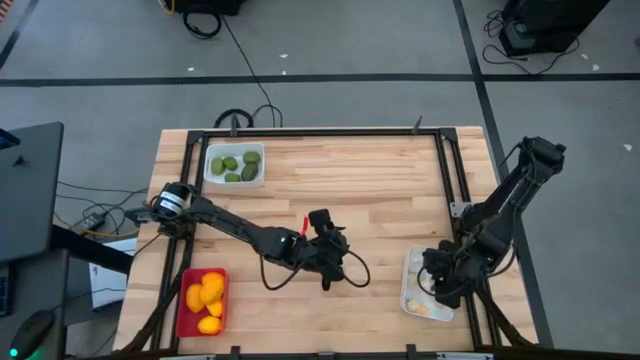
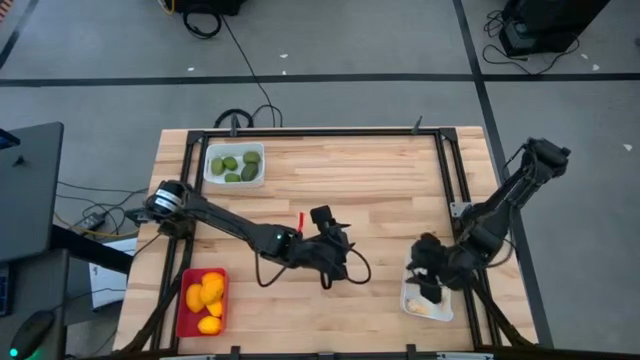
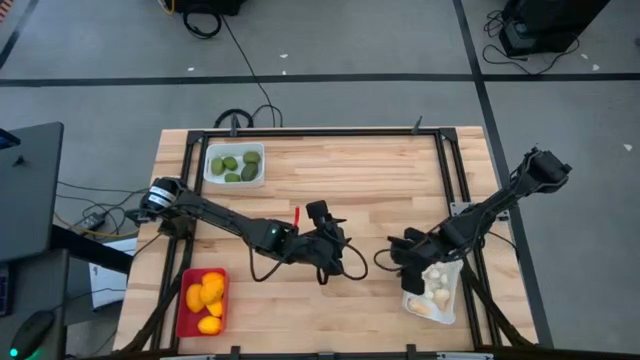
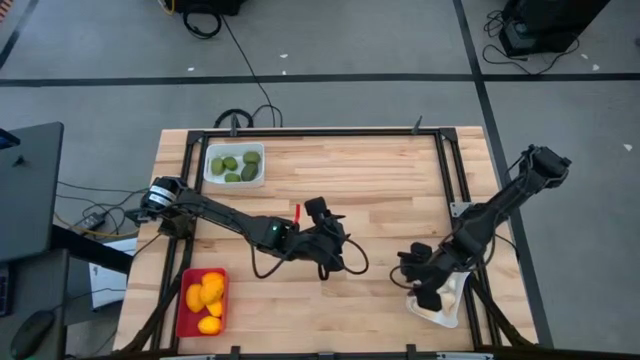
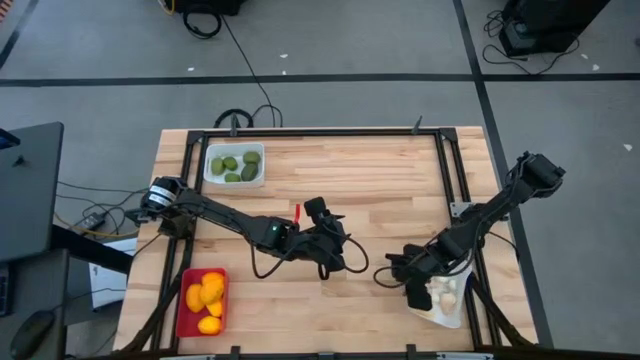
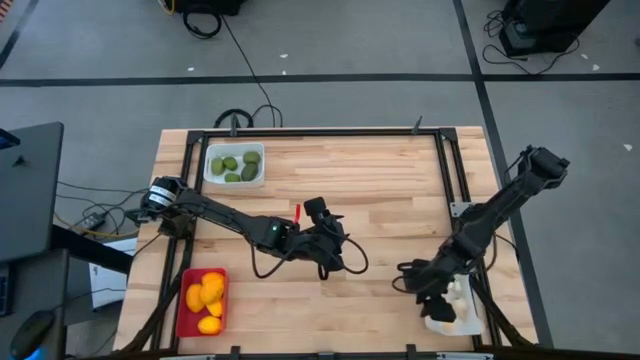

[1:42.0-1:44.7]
Task: Sort produce into baskets
Adjust the white bin

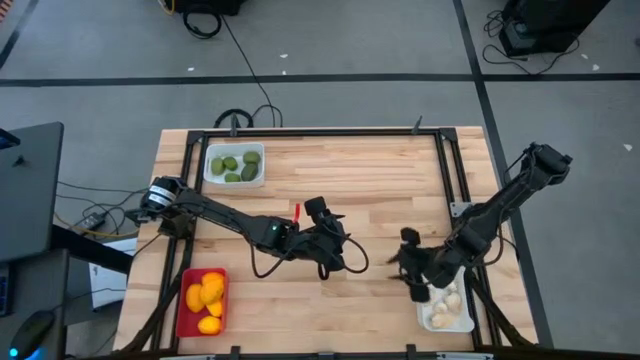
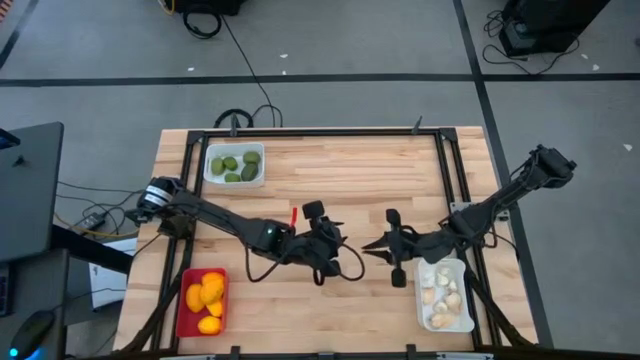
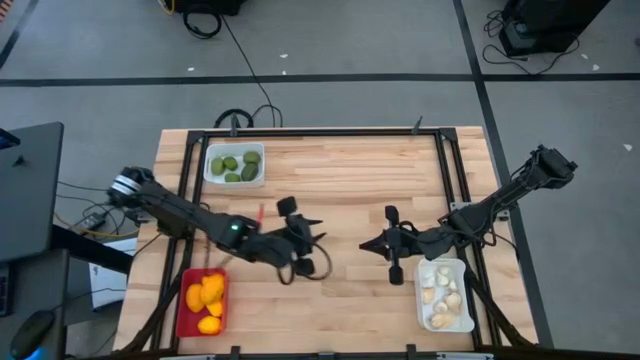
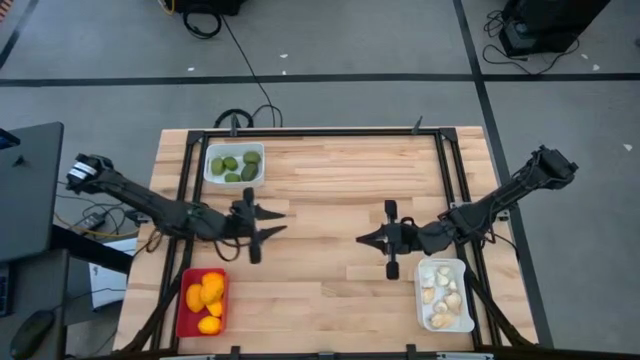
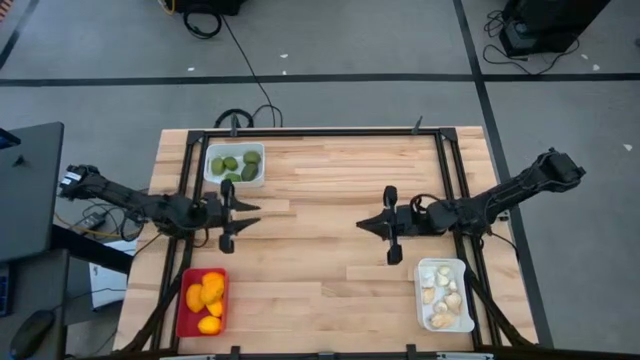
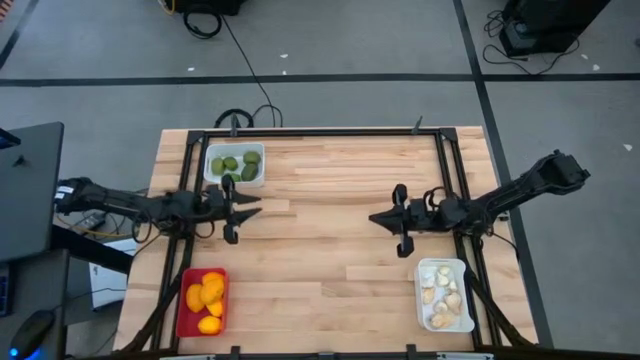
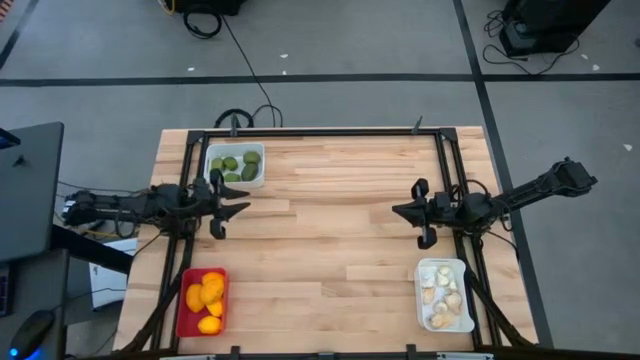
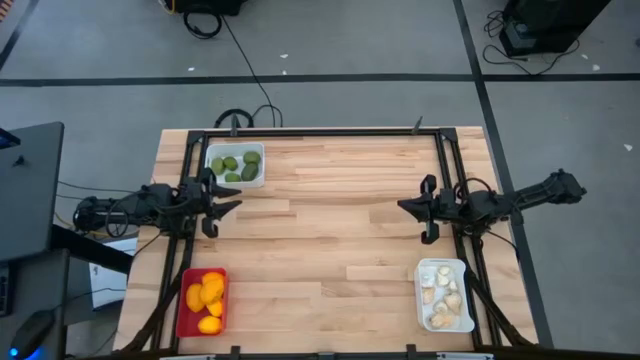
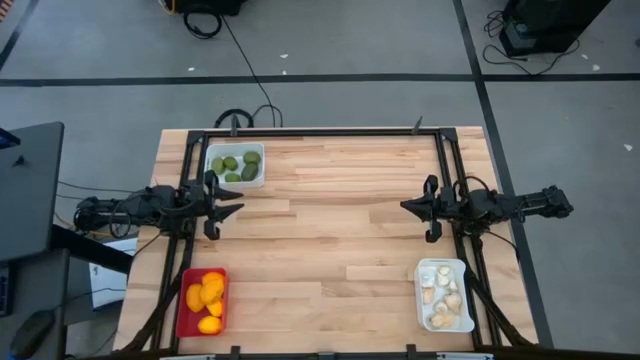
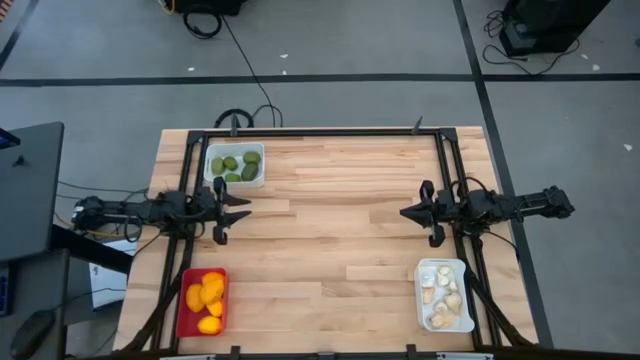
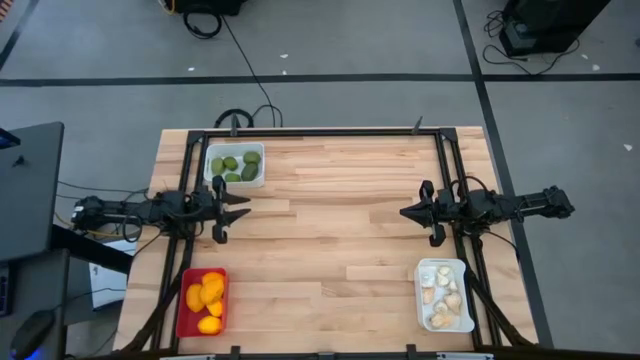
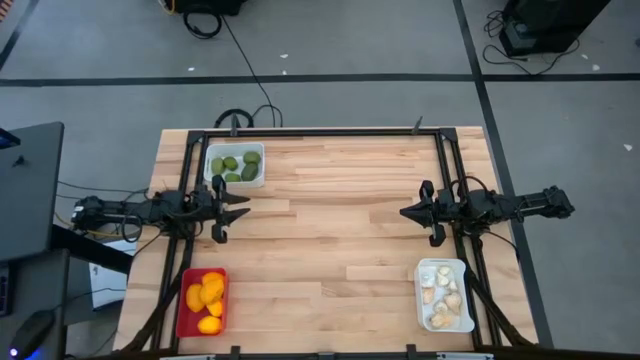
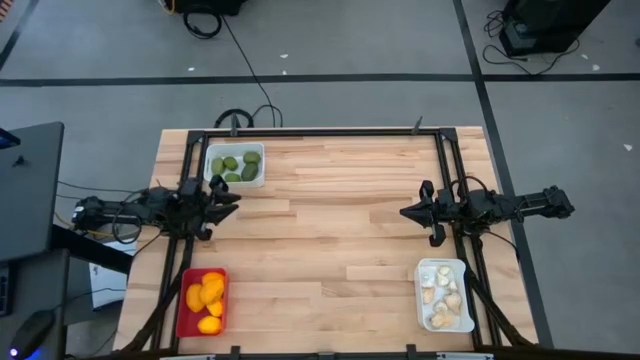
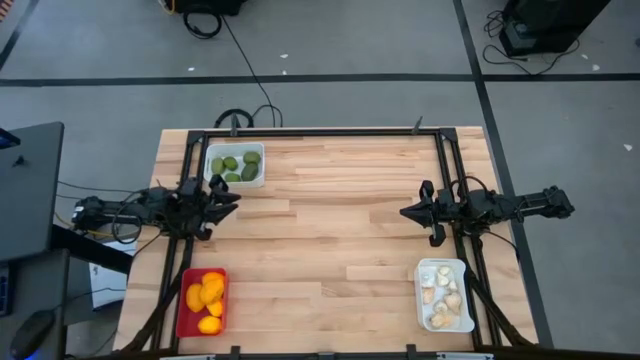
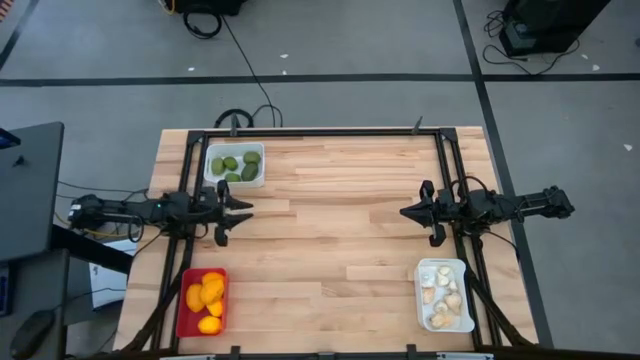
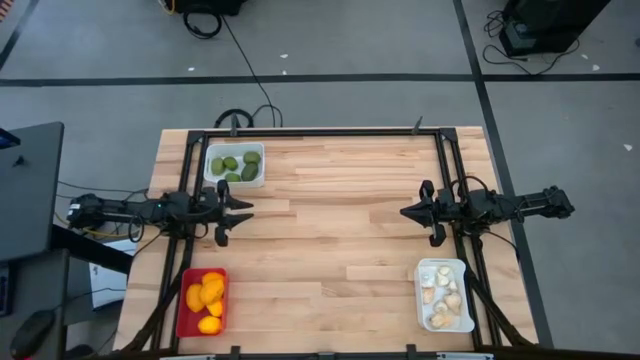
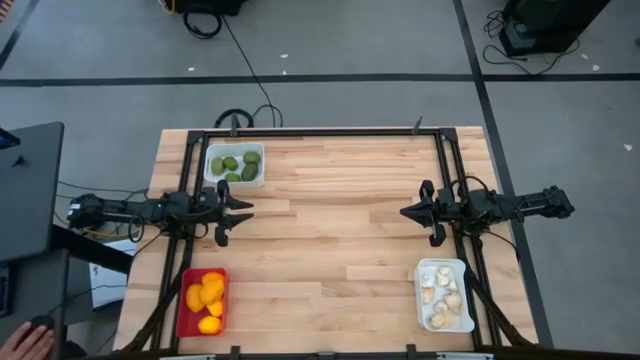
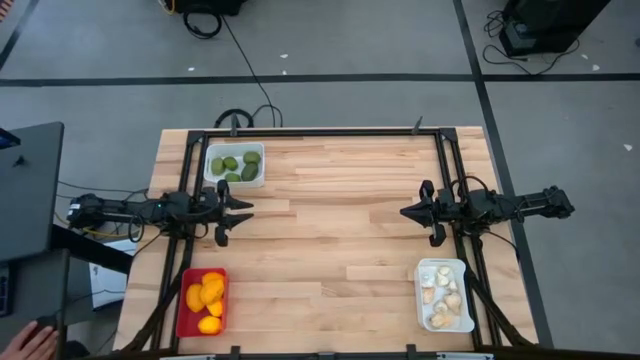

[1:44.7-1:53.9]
Return to Home Position

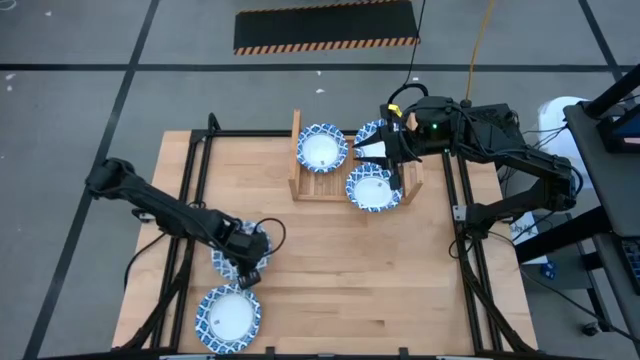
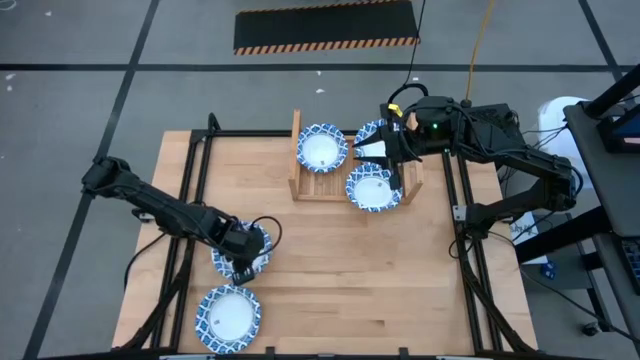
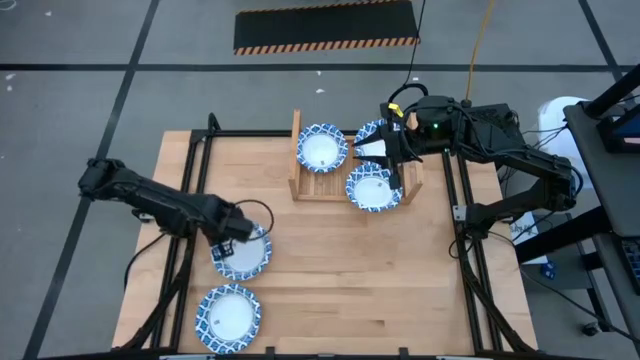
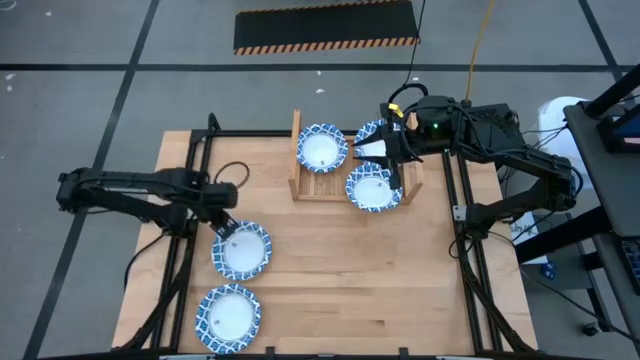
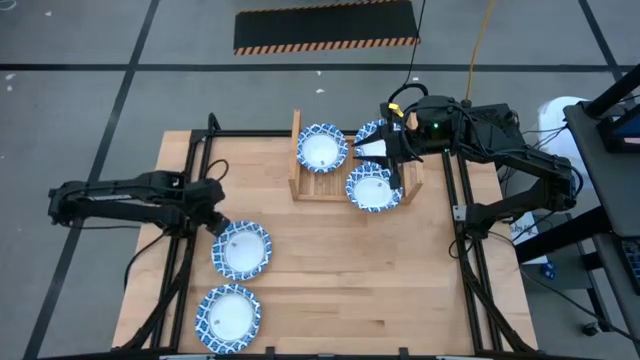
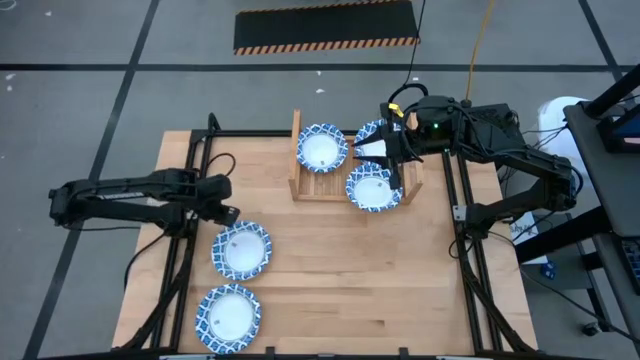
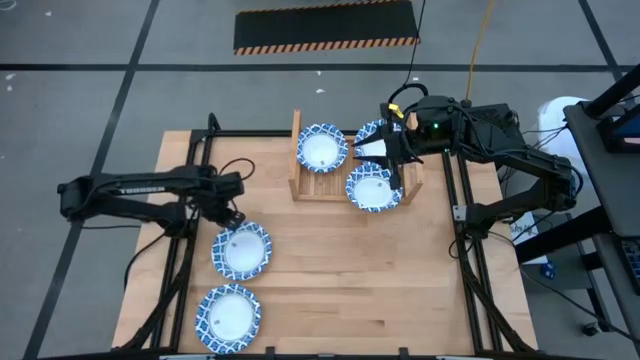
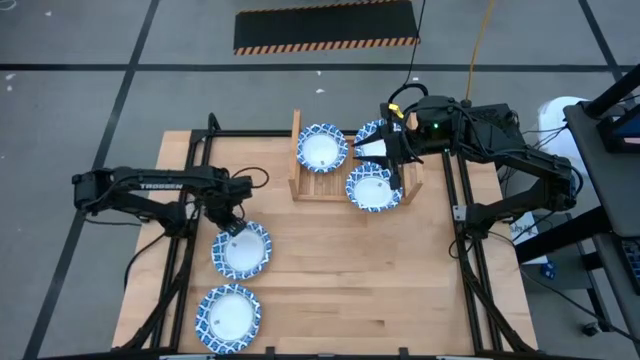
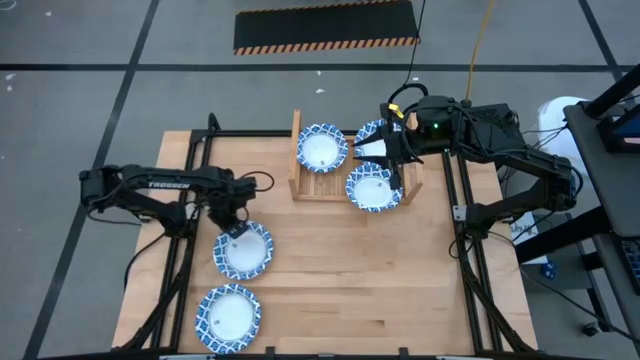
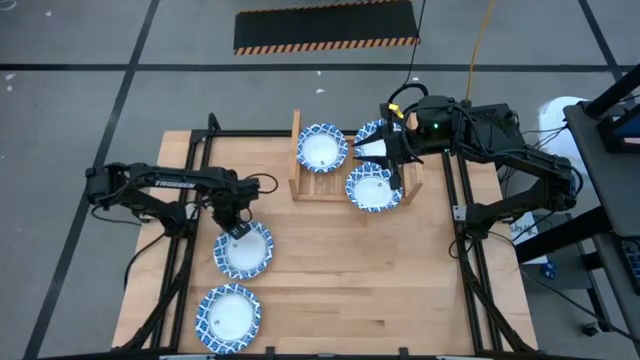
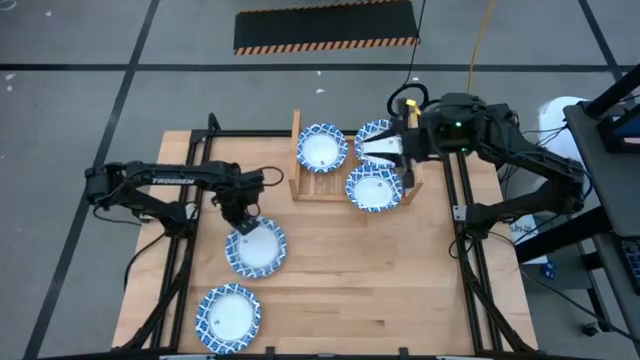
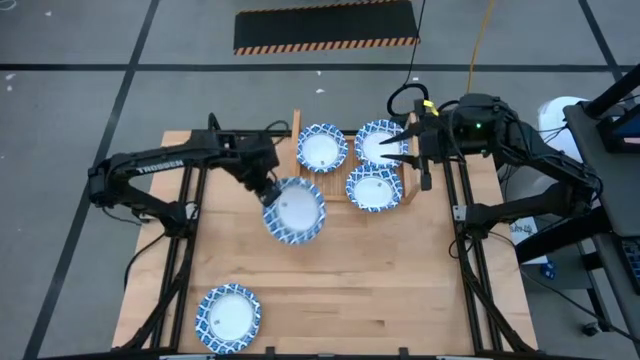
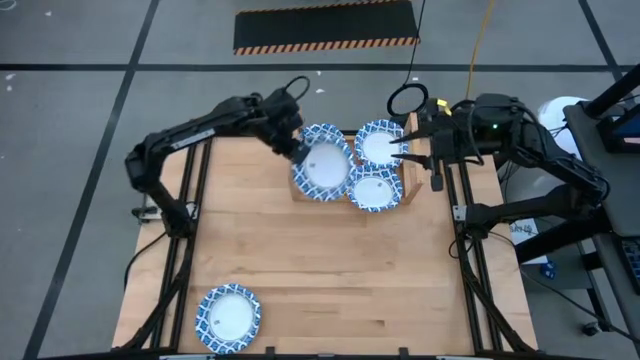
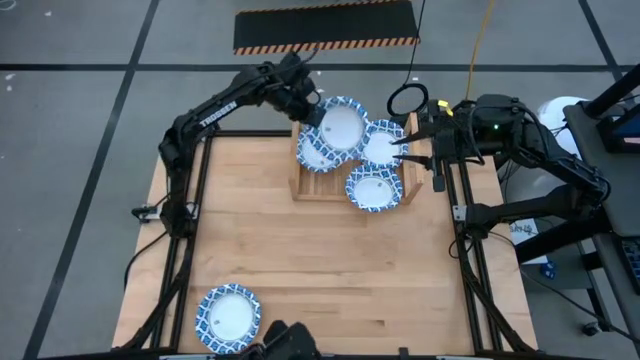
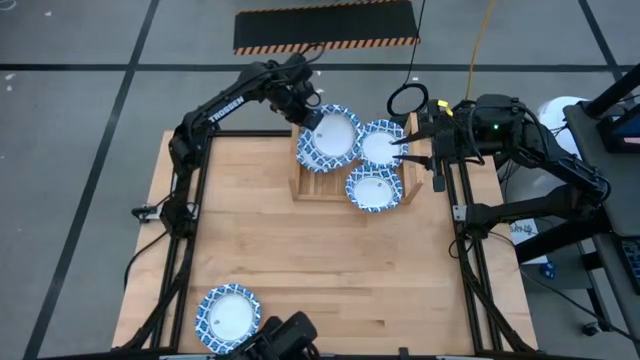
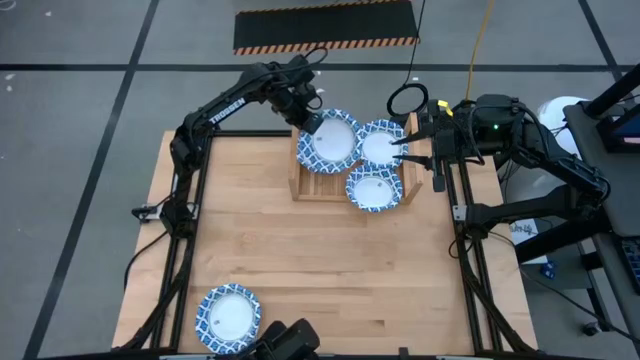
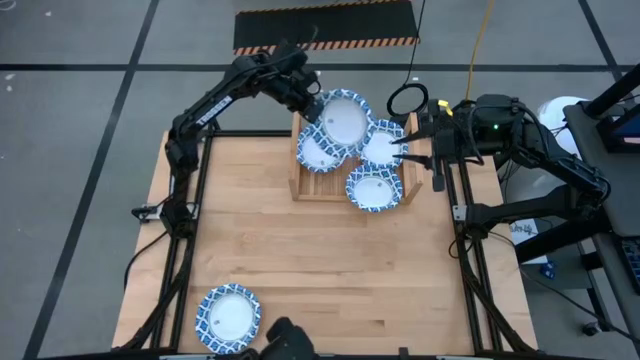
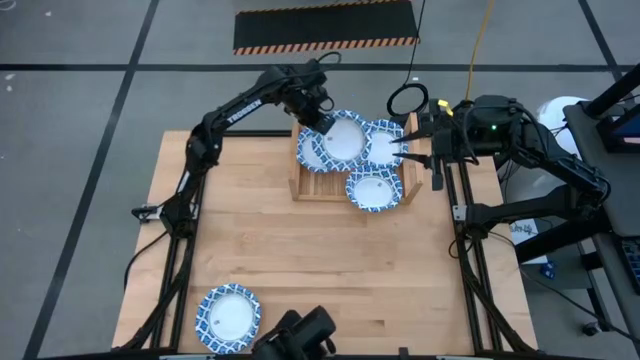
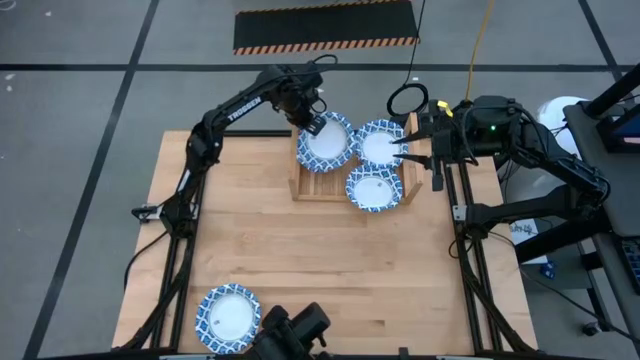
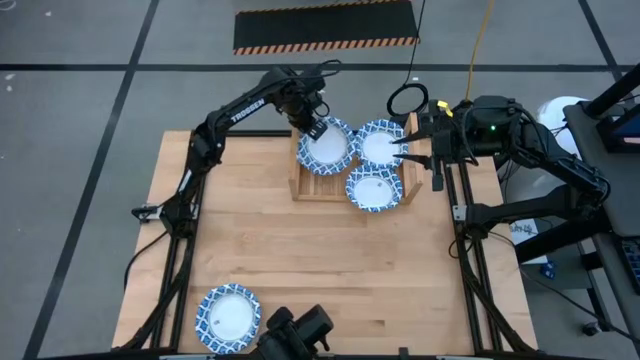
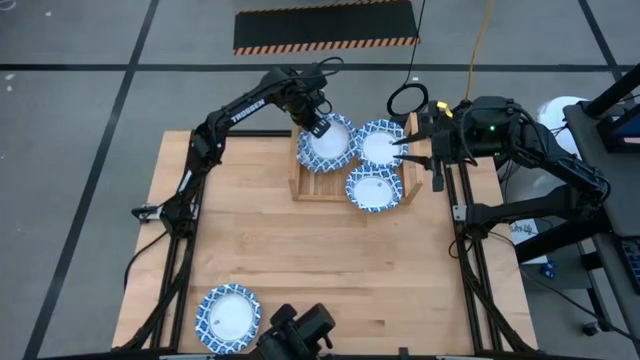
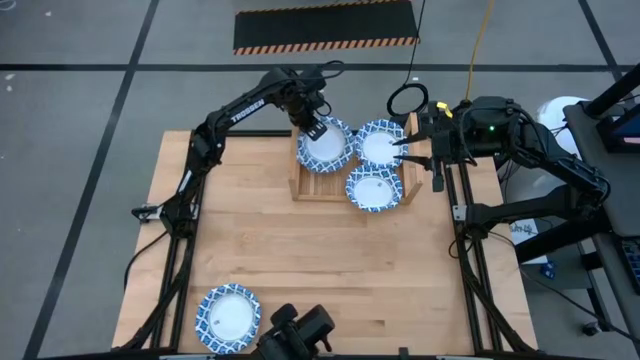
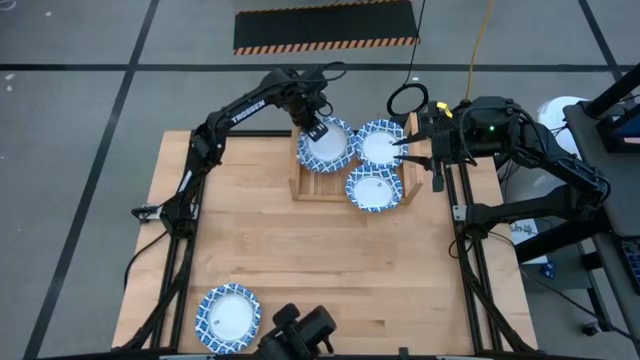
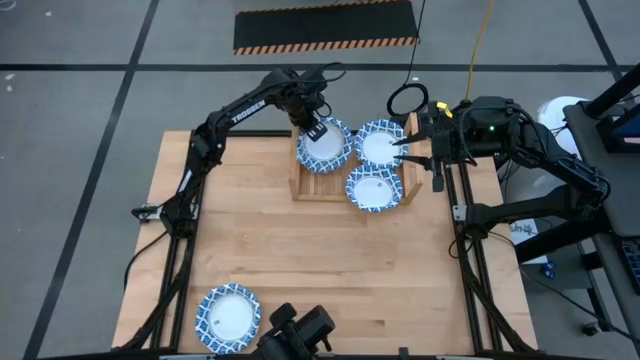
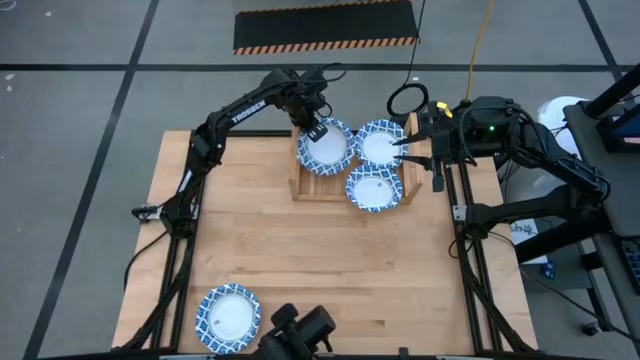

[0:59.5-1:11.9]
Task: Place and stack bowls onto a shelf
Stack the right blue patterned bowl on top of the other blue patterned bowl on the shelf
